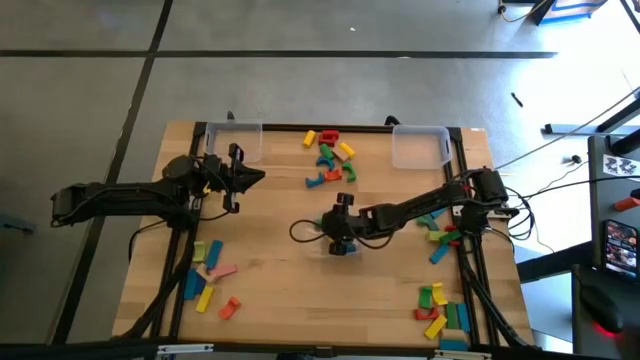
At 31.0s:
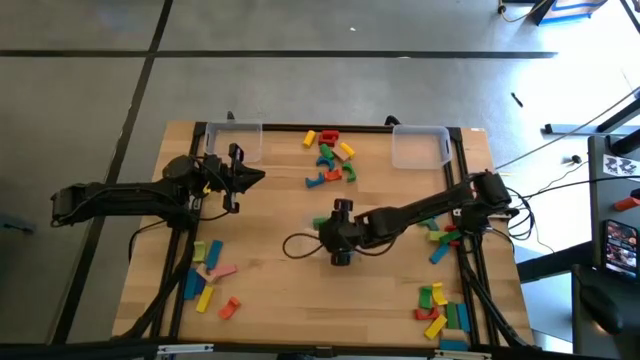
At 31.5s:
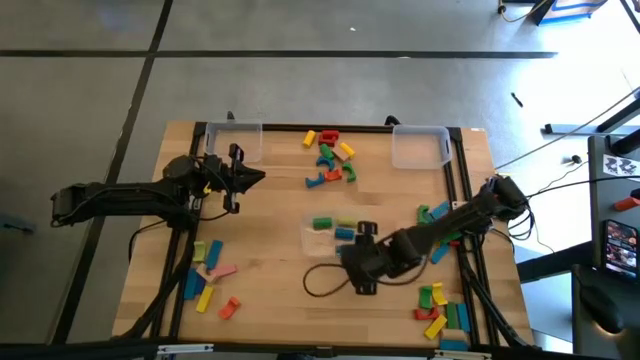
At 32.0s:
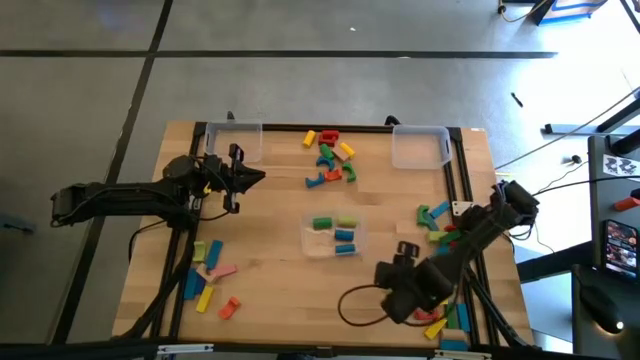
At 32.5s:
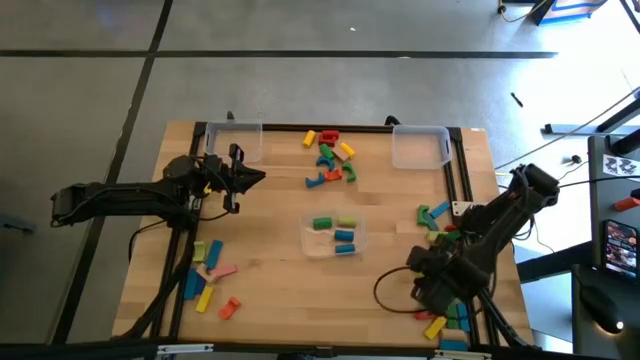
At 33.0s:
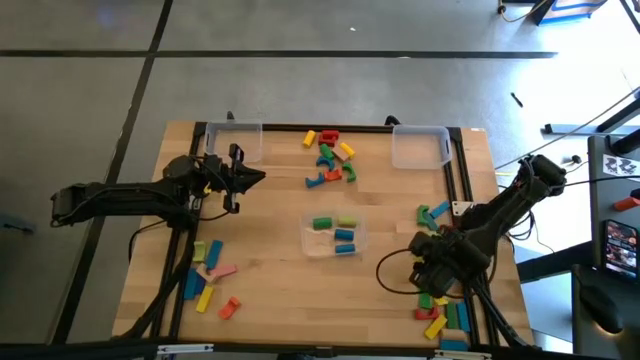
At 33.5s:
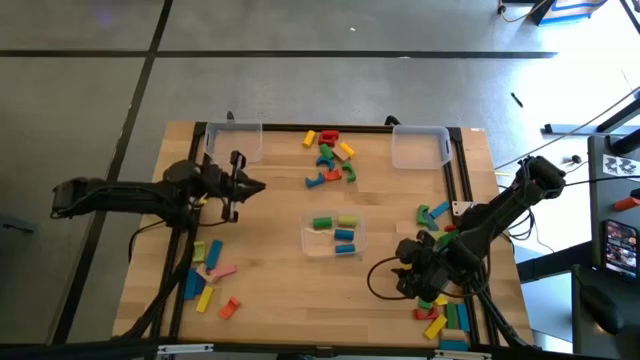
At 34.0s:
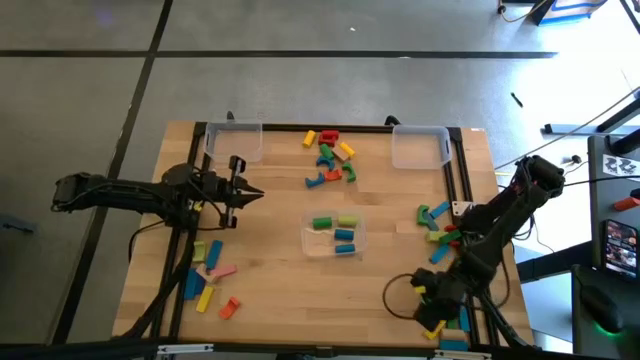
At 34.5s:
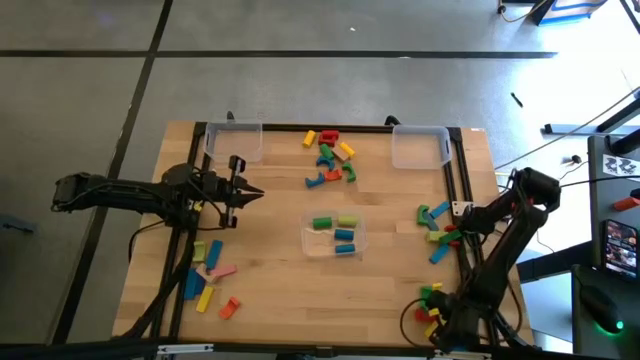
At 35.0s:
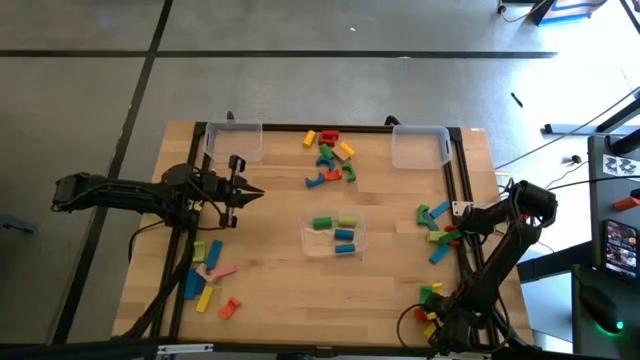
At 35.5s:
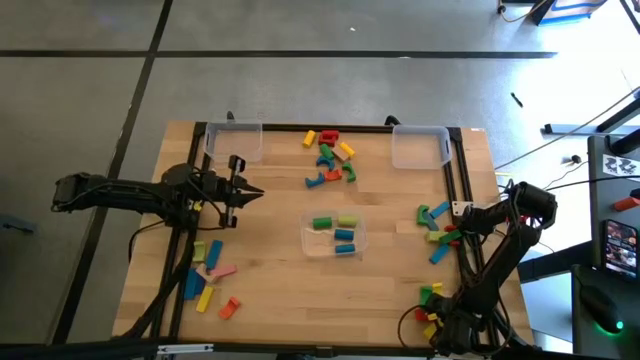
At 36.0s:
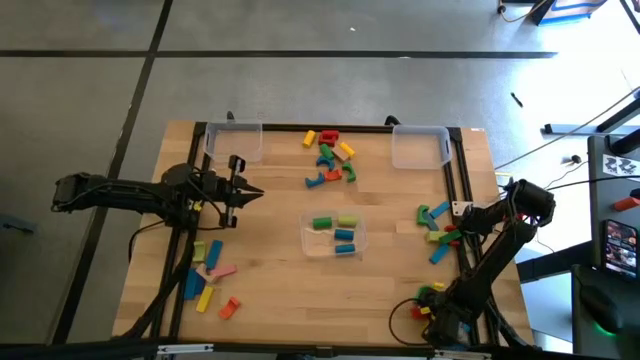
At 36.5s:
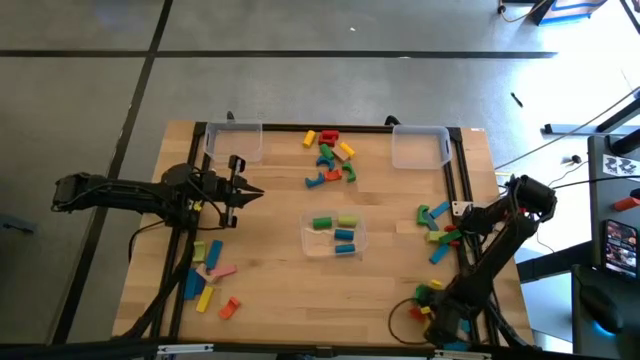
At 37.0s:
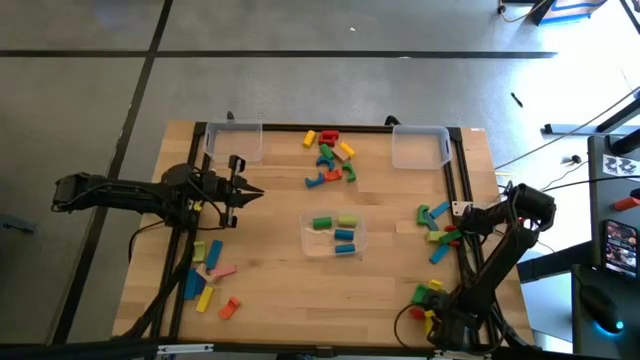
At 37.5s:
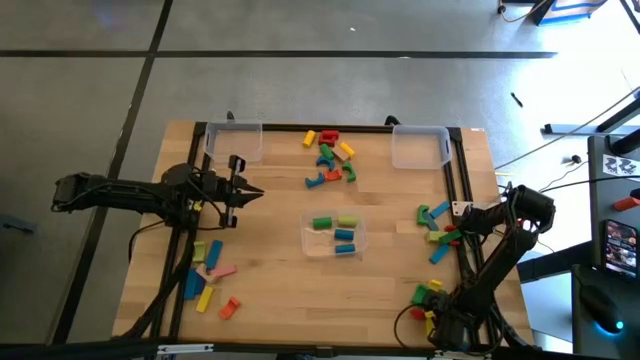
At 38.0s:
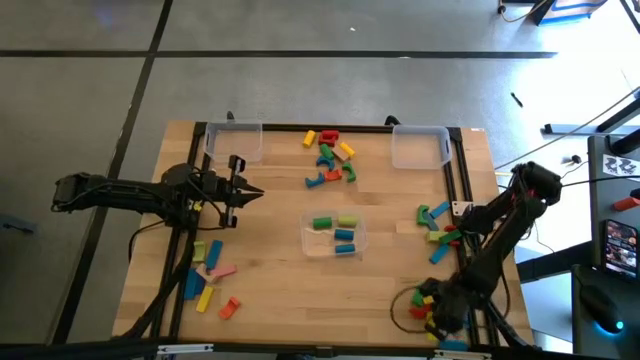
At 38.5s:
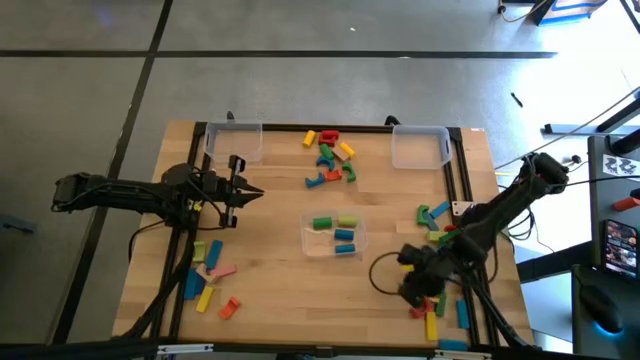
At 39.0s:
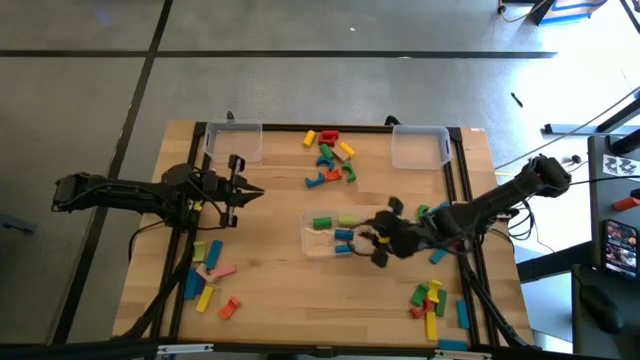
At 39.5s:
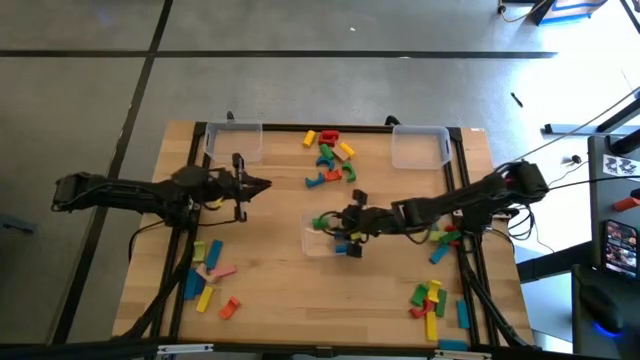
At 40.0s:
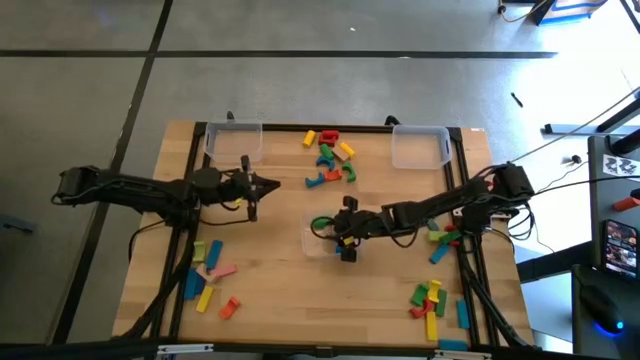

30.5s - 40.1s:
Task: Sort blocks by size
Put the light brown cylindrical block into the bottom transparent bin

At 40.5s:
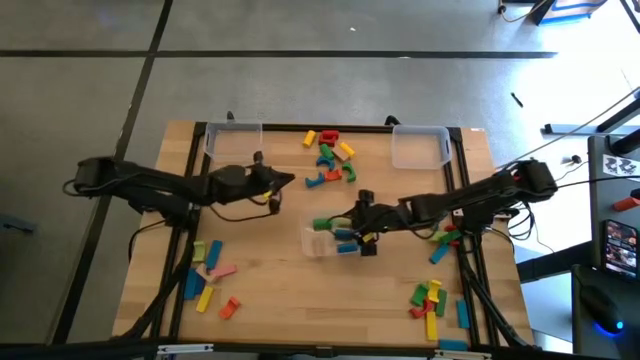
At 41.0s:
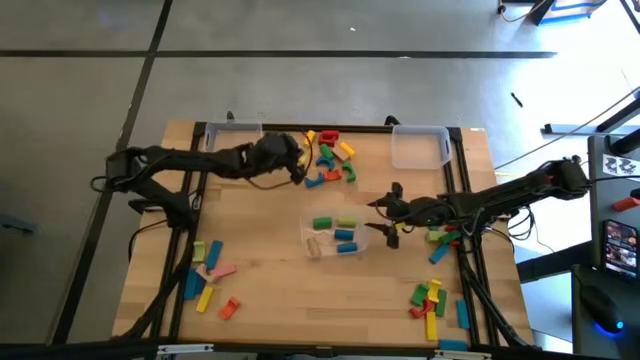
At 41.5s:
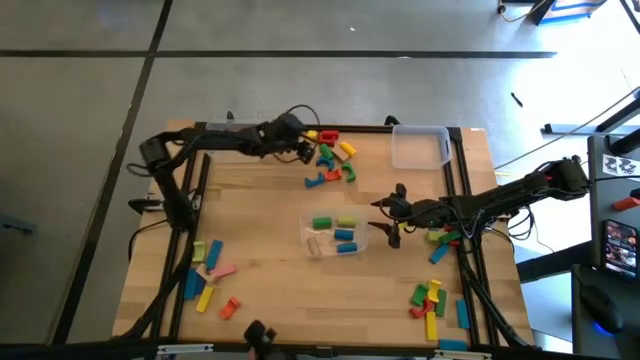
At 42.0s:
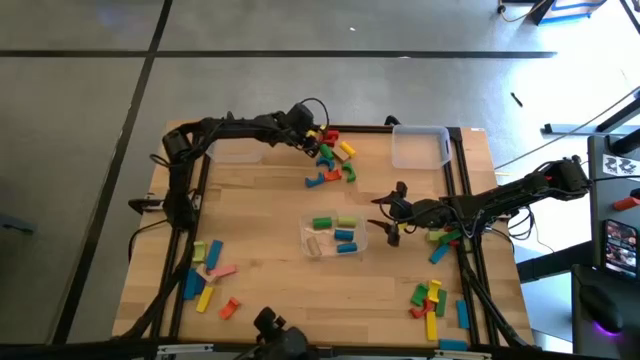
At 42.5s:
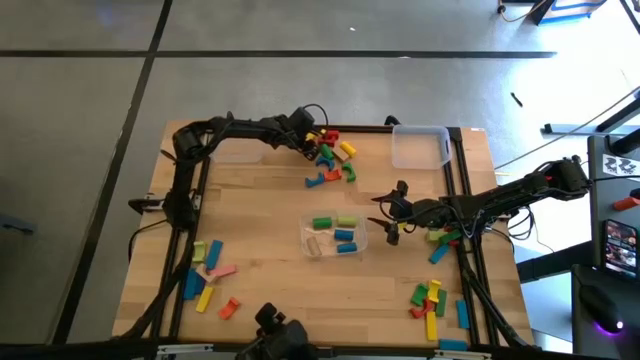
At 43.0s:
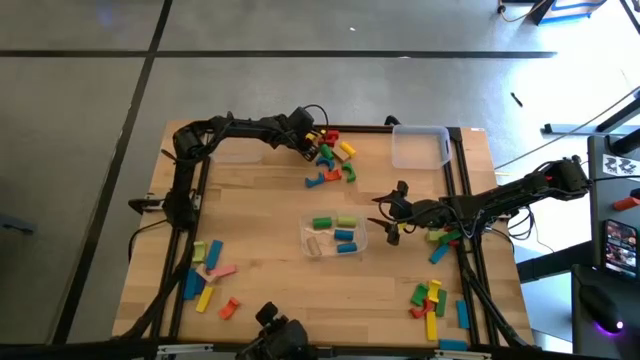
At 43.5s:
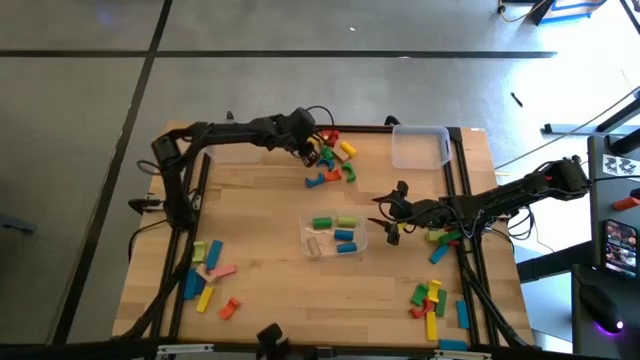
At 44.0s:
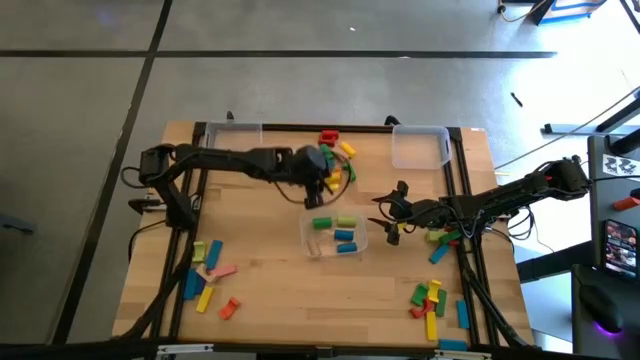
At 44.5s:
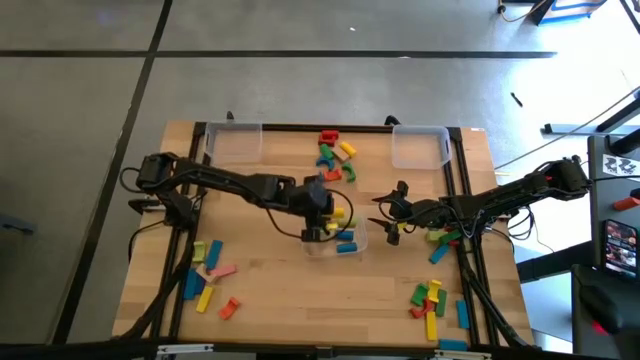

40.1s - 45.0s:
Put the yellow cylindrical block into the bottom transparent bin

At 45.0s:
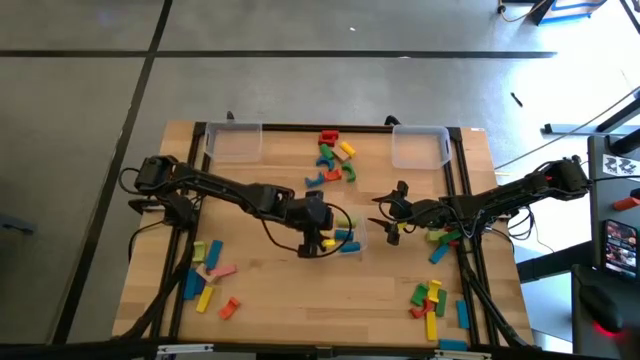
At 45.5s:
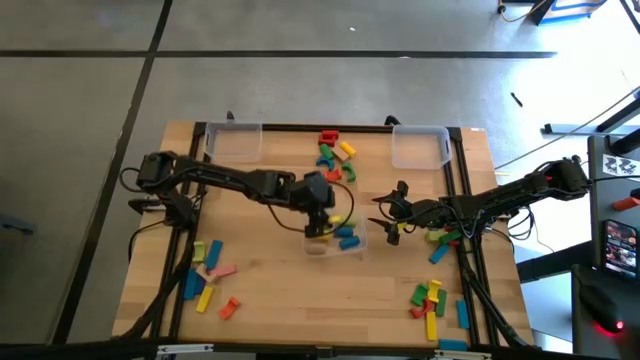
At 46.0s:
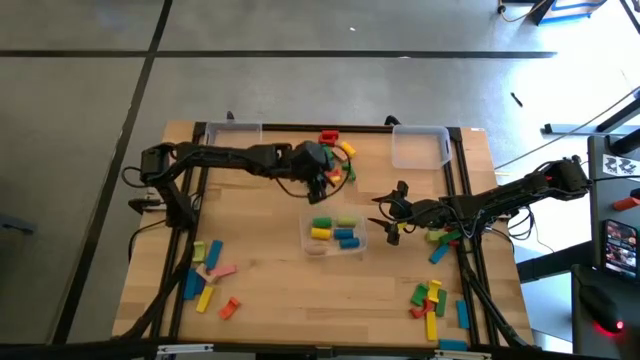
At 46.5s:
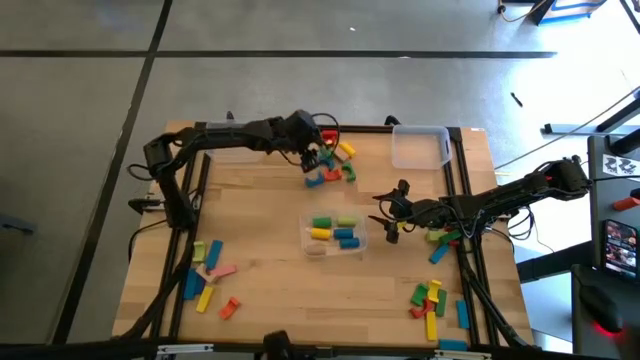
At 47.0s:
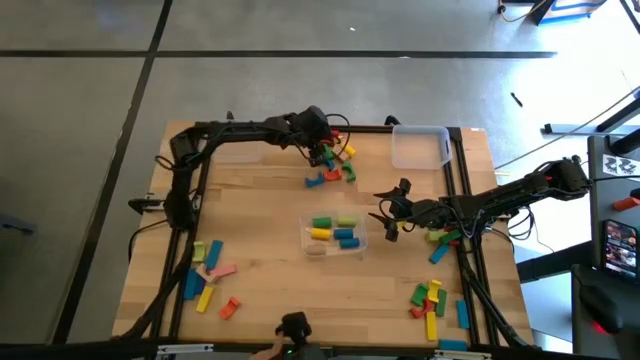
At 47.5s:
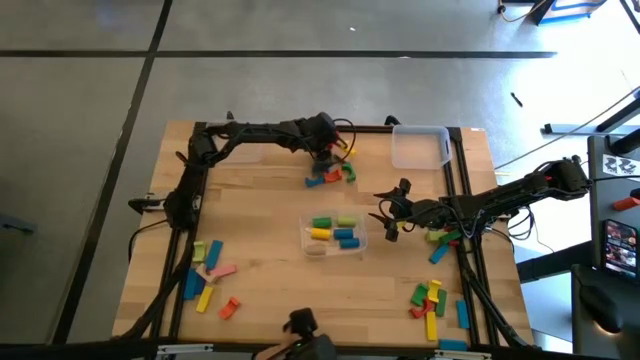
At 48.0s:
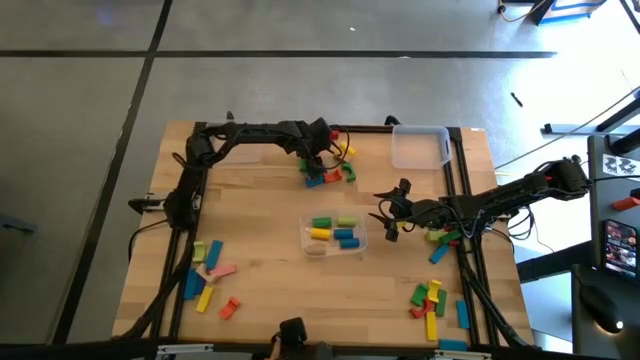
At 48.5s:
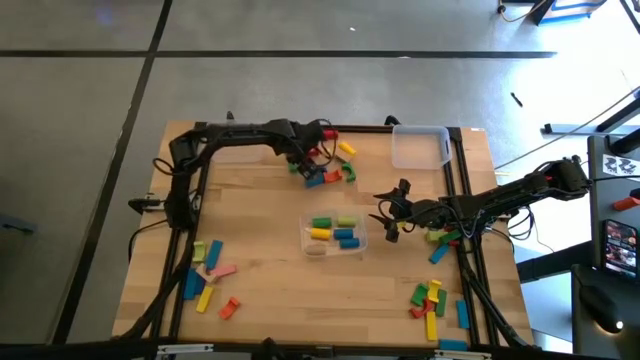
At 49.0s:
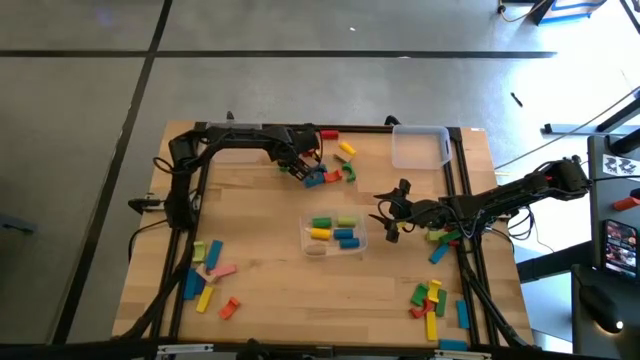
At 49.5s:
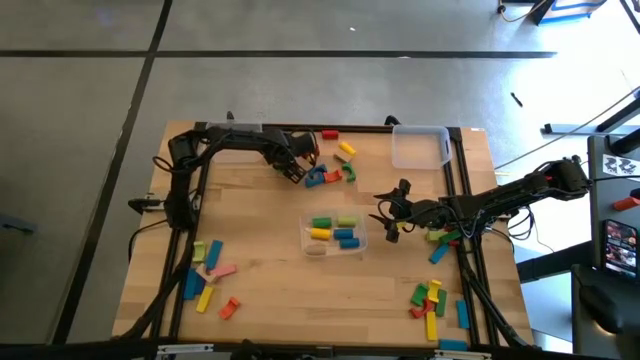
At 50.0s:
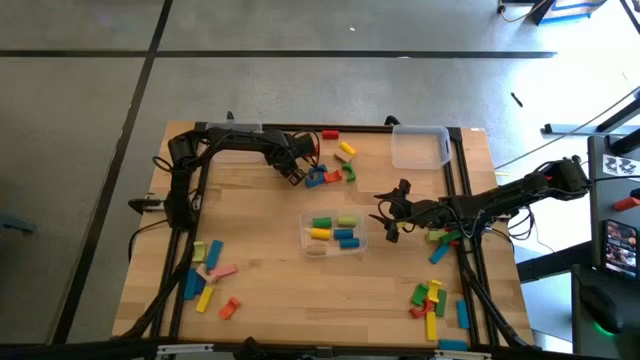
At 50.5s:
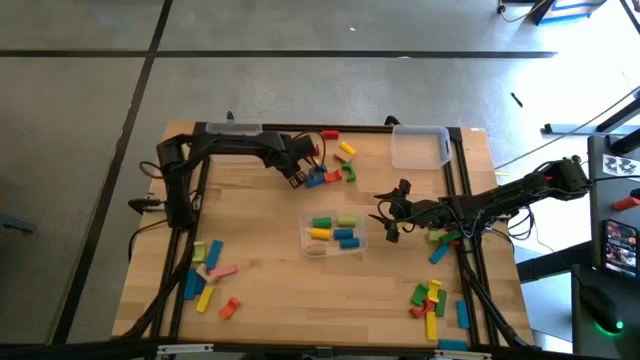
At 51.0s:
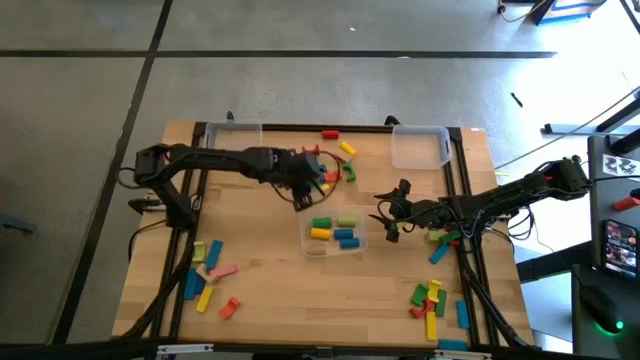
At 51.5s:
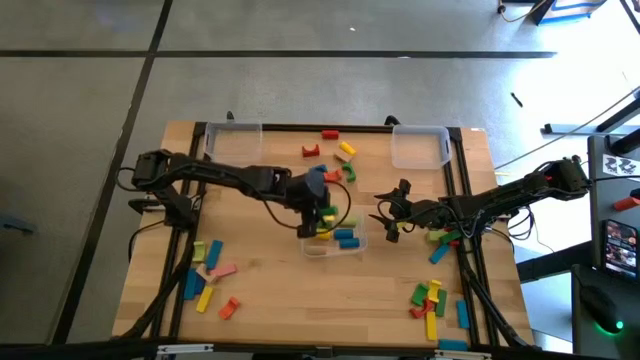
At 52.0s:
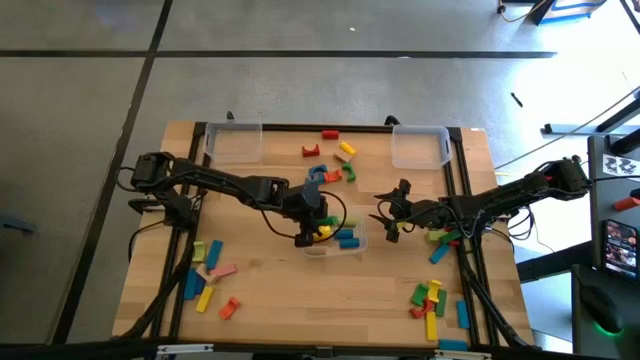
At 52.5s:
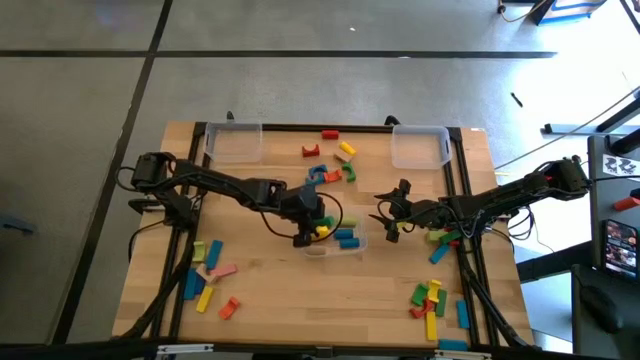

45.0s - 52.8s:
Put the green cylindrical block into the bottom transparent bin
